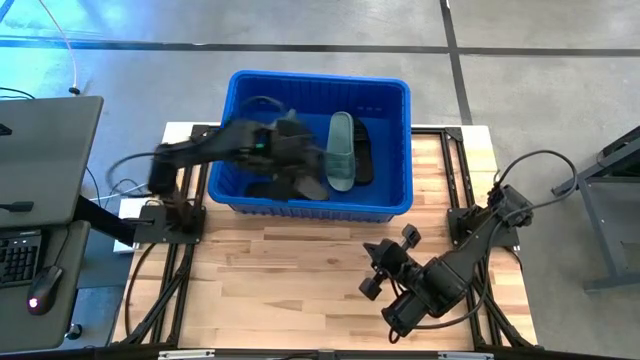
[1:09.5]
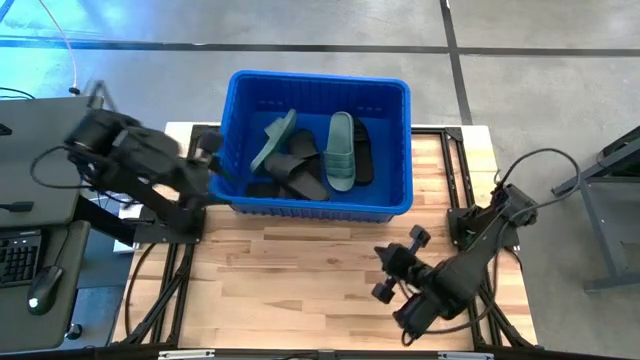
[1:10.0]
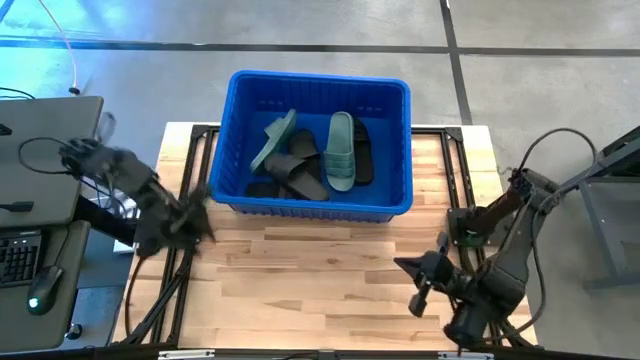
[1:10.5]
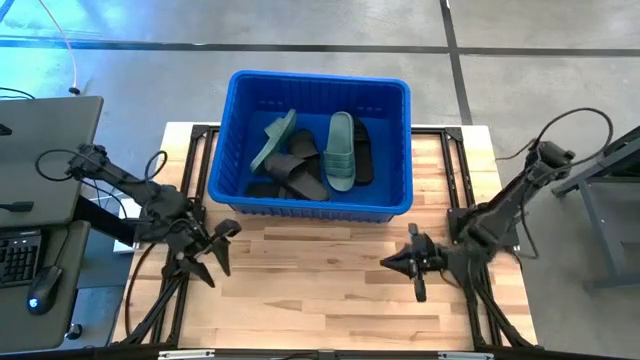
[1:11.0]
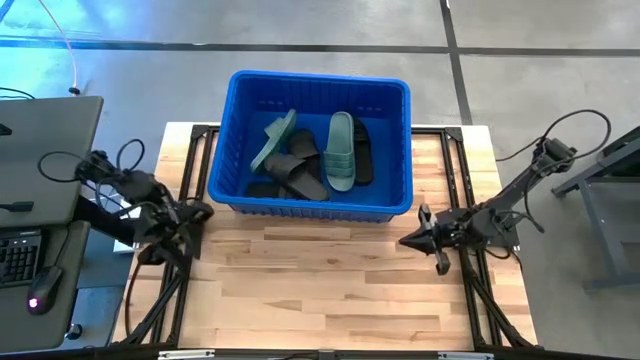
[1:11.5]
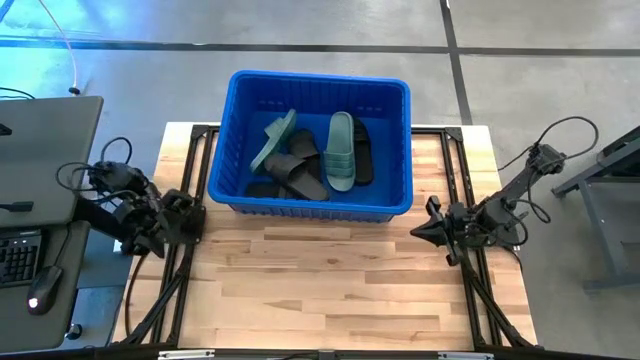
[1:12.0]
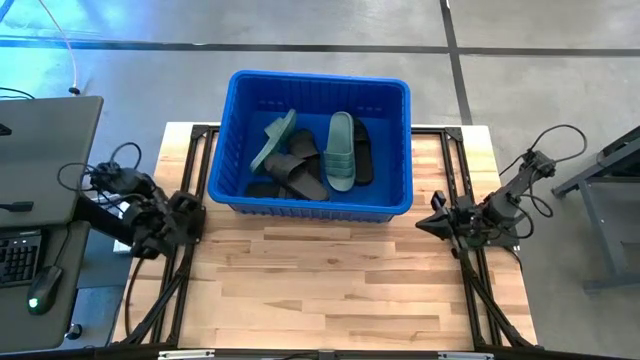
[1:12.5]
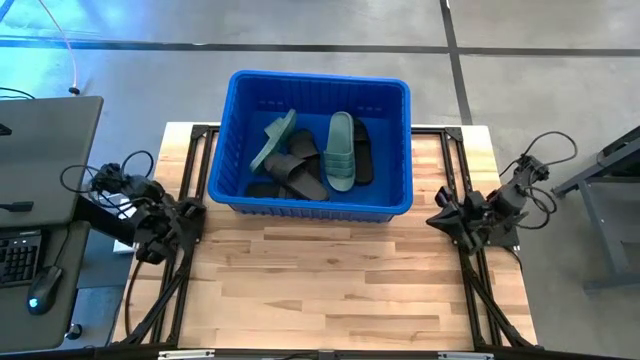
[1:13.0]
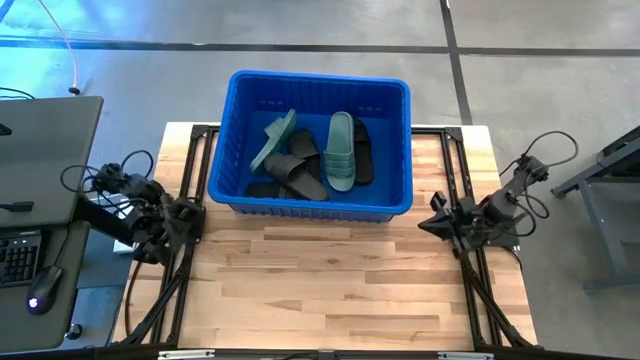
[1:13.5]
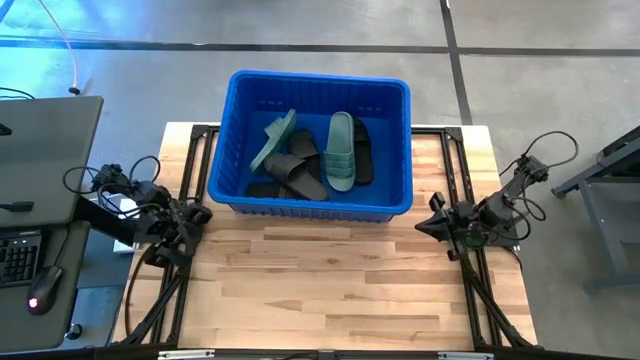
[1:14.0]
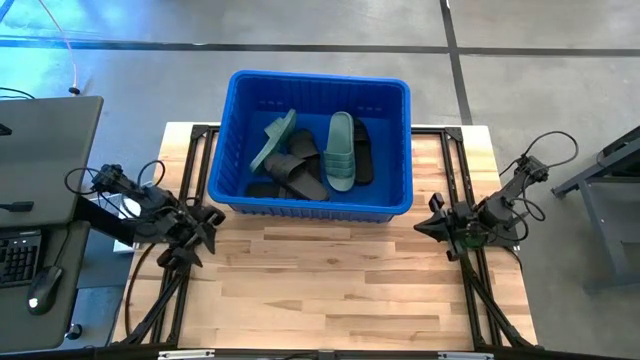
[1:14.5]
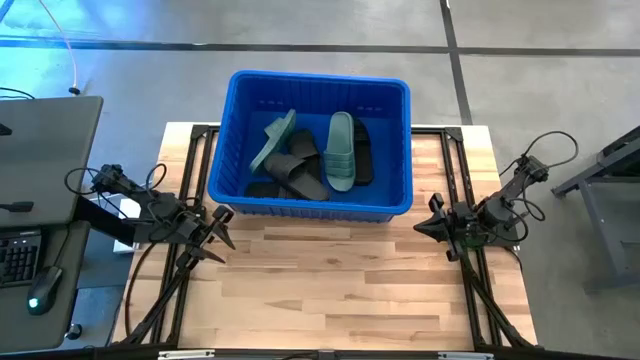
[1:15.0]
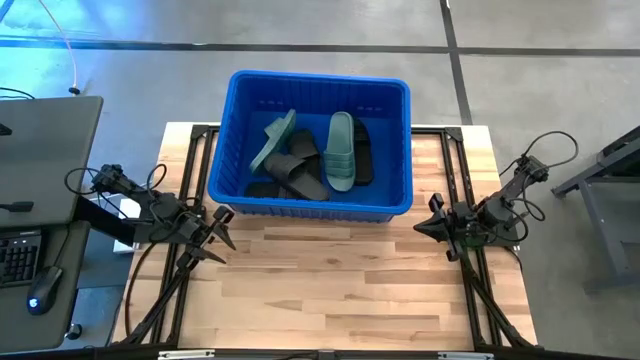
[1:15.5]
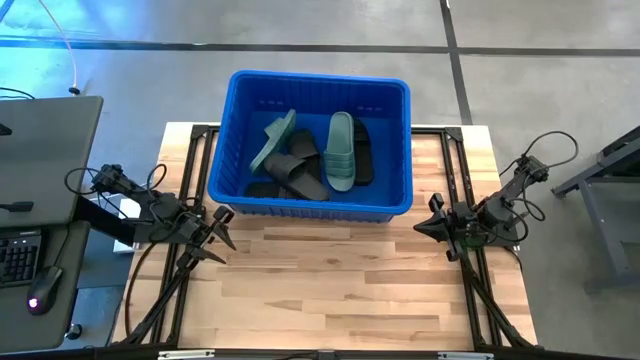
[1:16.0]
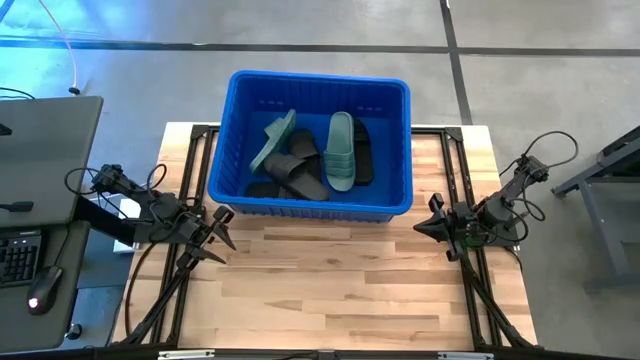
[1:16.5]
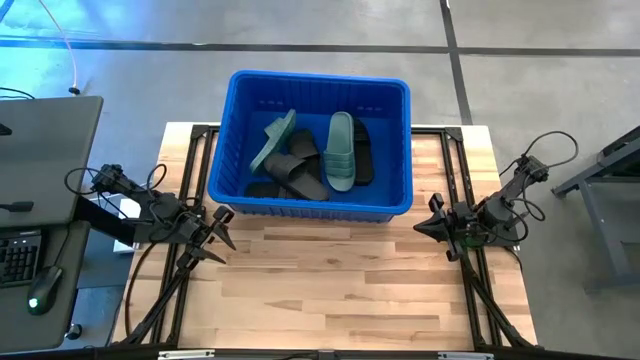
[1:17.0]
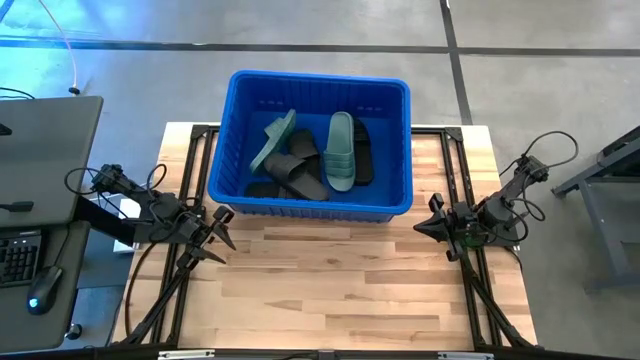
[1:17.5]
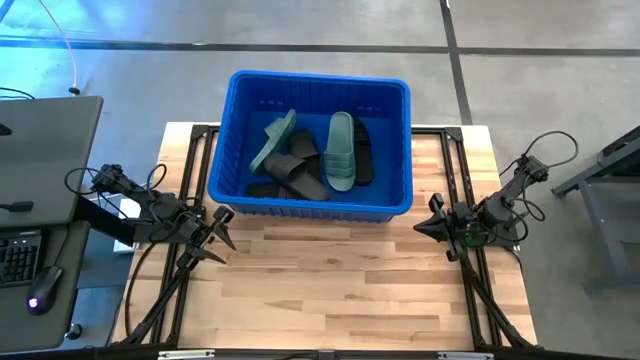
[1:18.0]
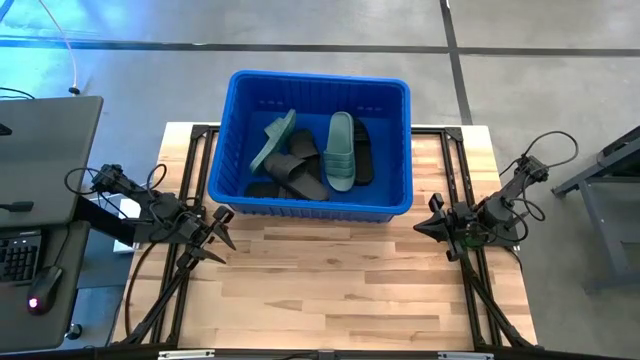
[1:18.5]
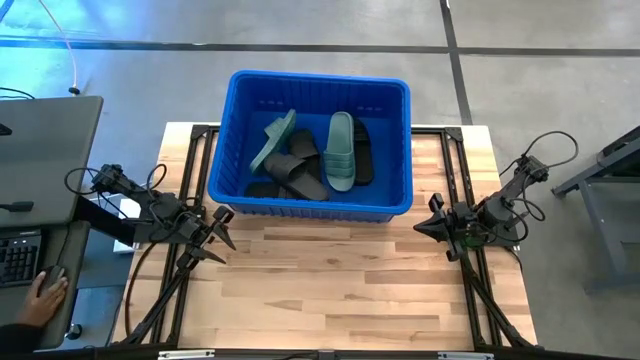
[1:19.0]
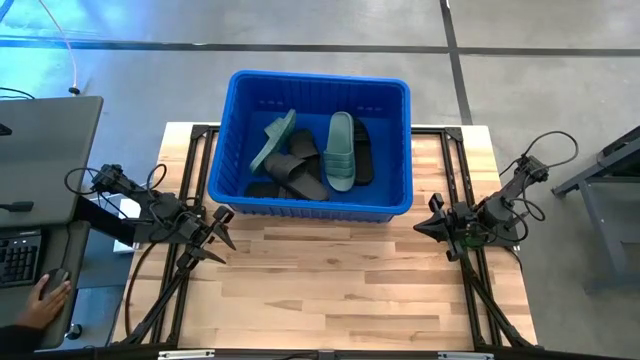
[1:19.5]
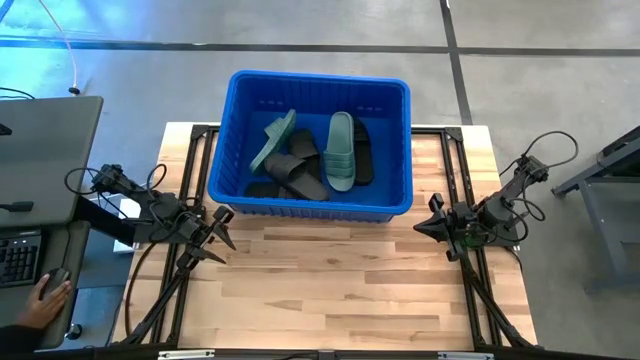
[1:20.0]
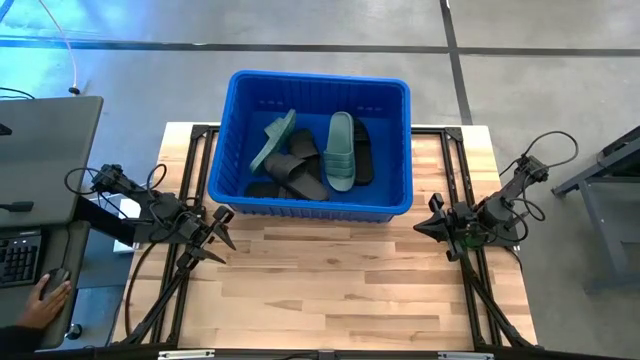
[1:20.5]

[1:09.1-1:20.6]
Task: Pick and place slides into bin
Return to Home Position

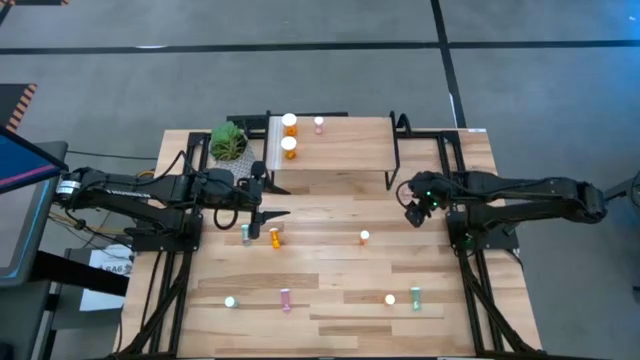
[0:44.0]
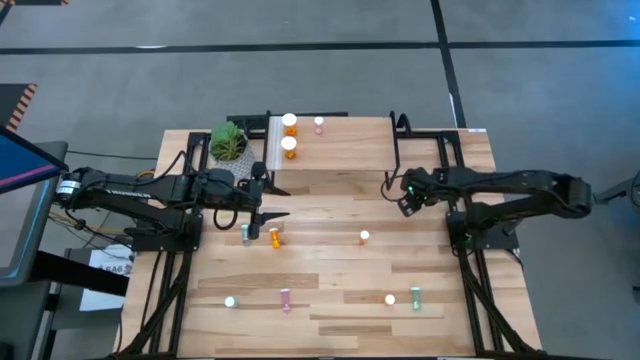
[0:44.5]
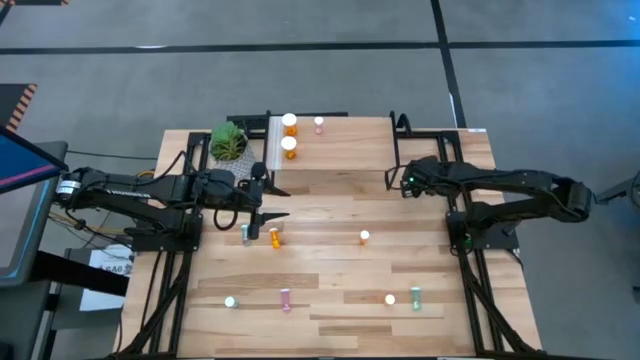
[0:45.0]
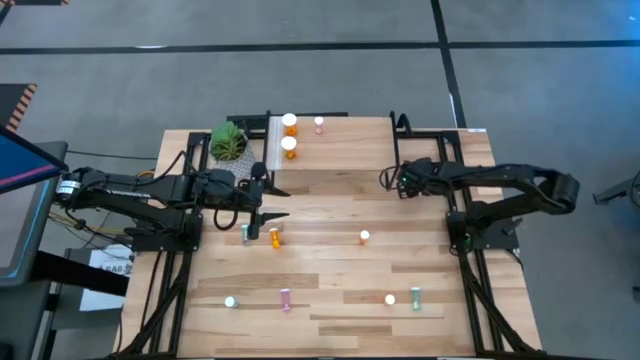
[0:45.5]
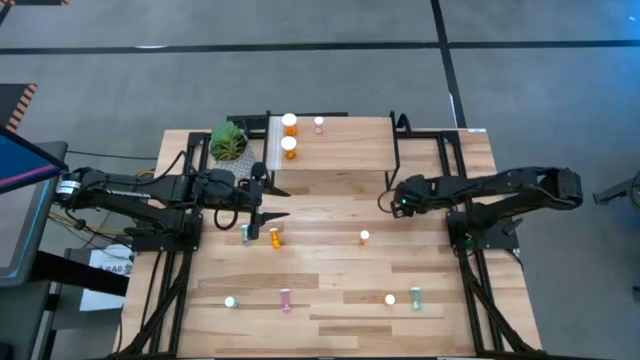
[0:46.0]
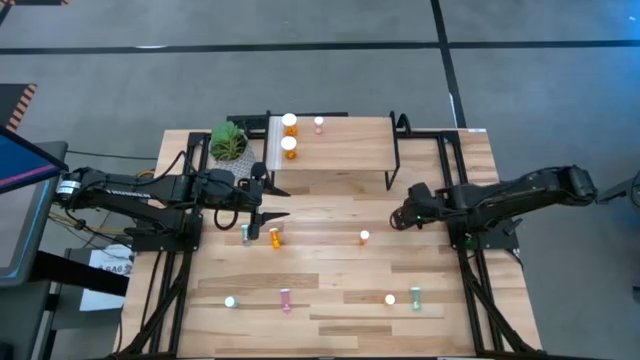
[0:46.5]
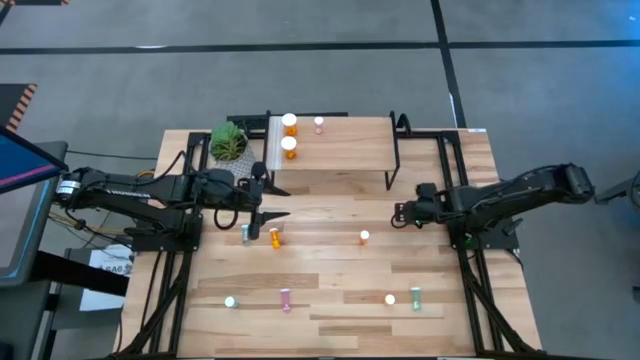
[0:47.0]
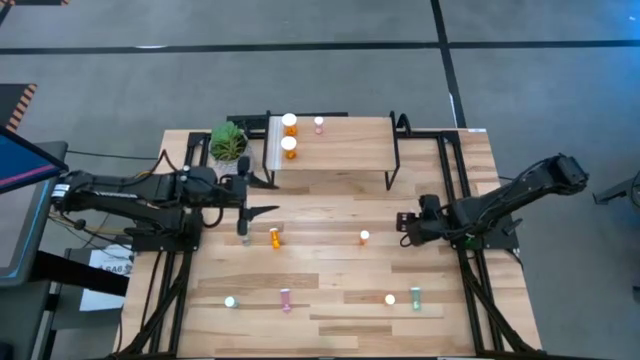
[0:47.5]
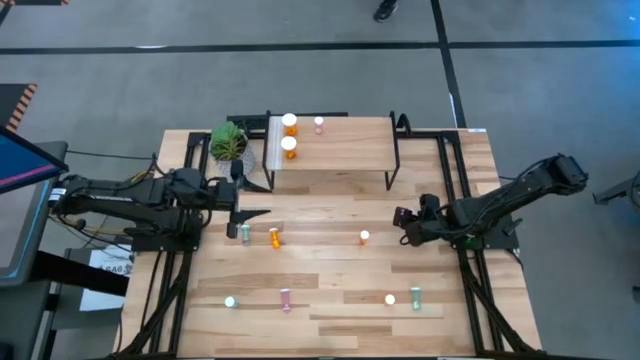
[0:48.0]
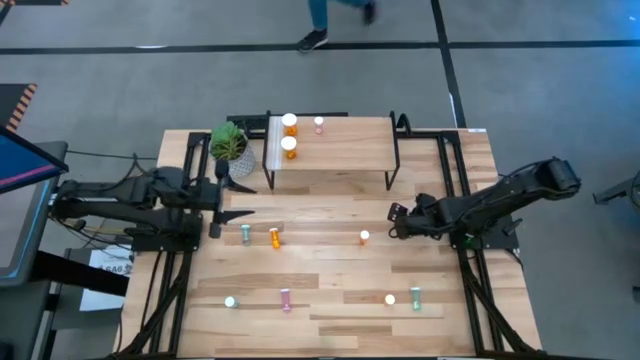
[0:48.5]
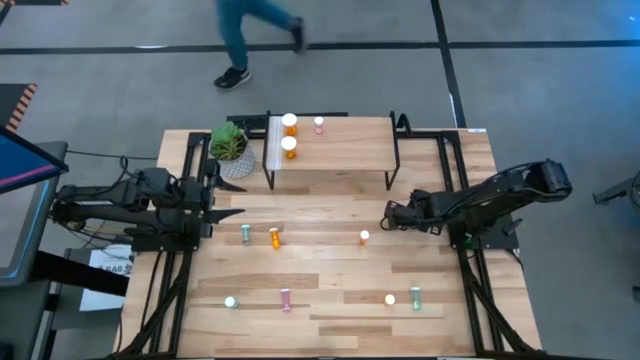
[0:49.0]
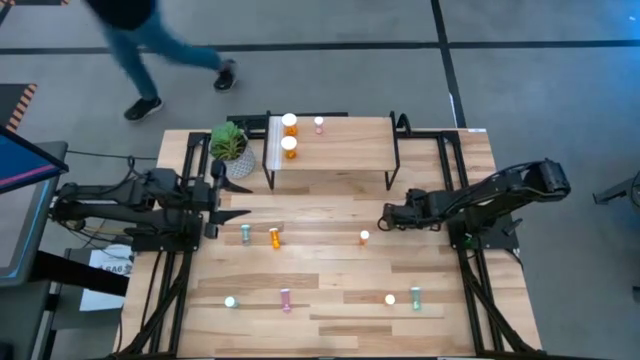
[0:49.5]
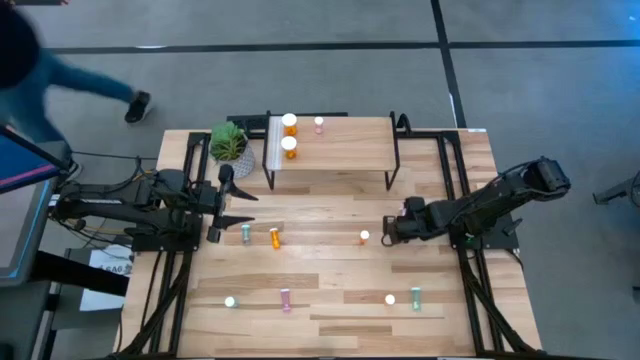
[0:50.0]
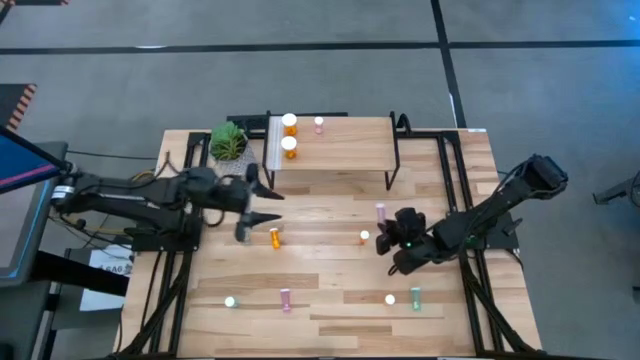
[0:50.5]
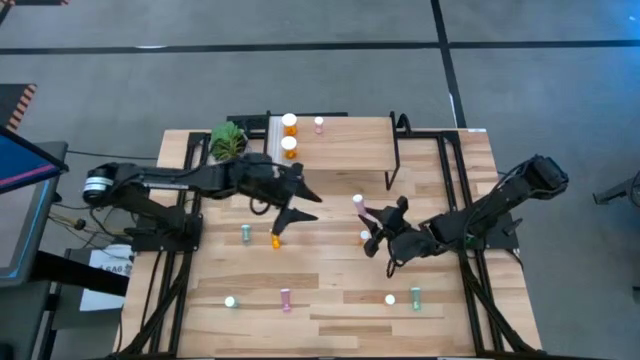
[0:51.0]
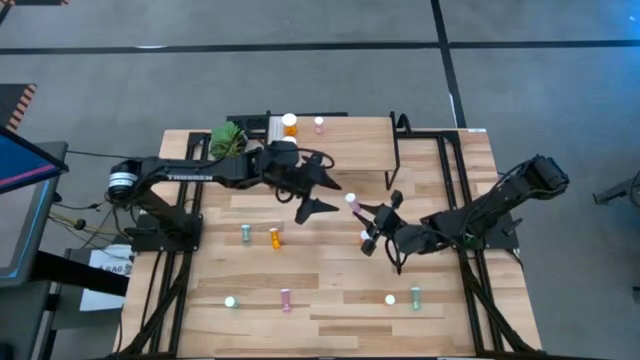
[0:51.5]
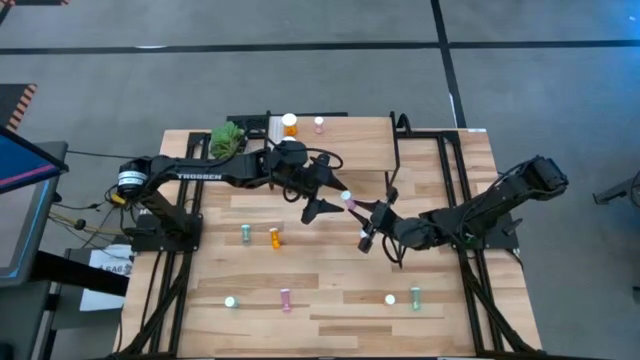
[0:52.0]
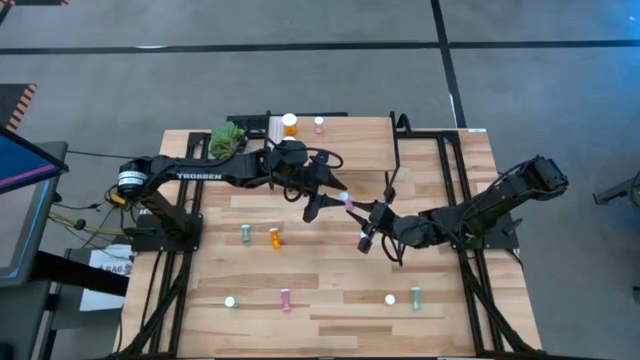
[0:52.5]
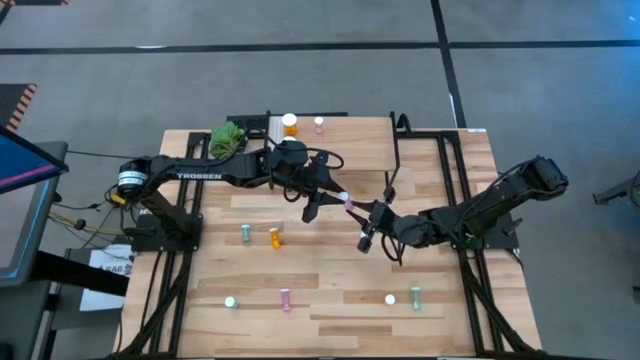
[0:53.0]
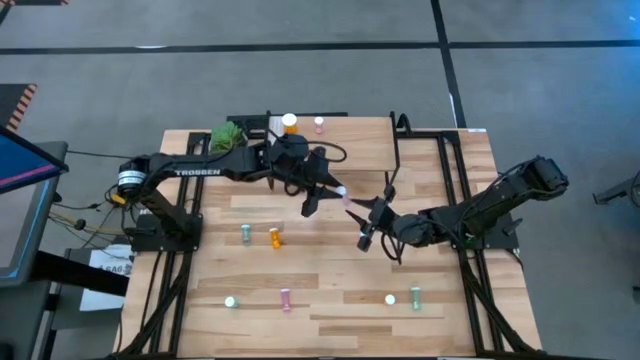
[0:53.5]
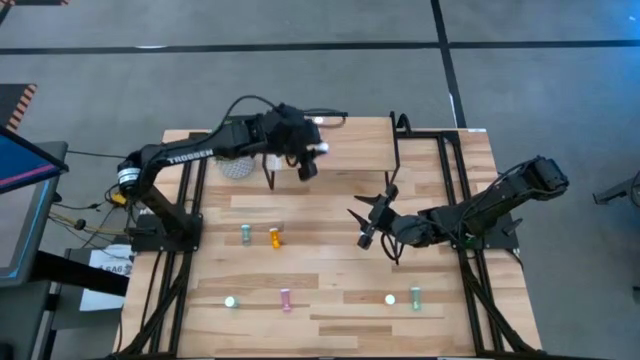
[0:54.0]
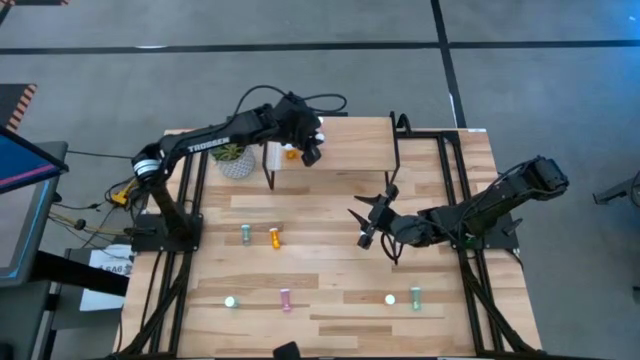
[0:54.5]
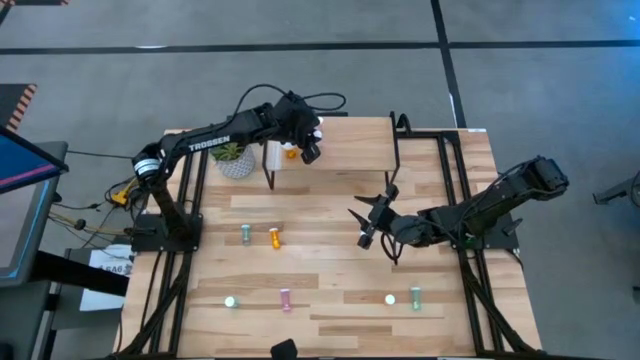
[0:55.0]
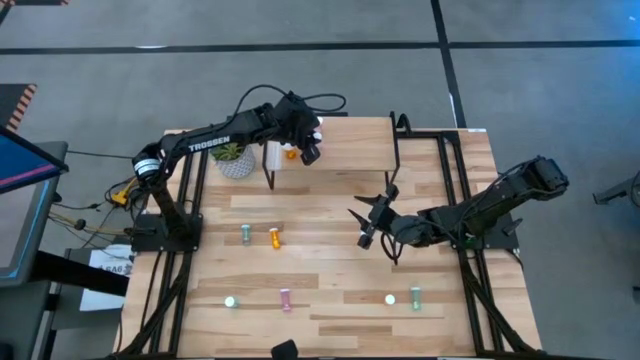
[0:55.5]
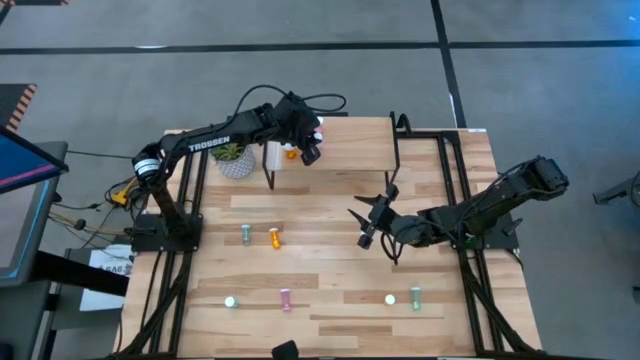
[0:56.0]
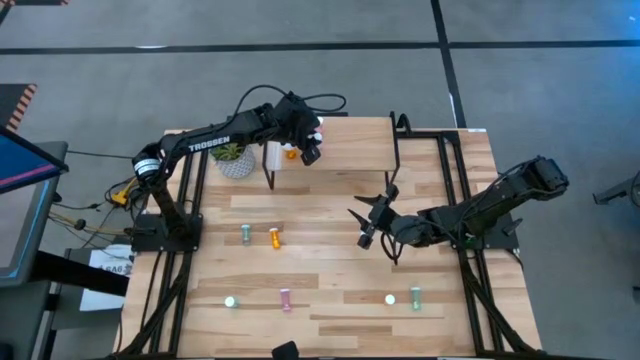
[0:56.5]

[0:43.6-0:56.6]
Task: Pick and place medicine bottles onto shelf by color
Put the top pink bottle aligned with the other pink pill bottle on the shelf
